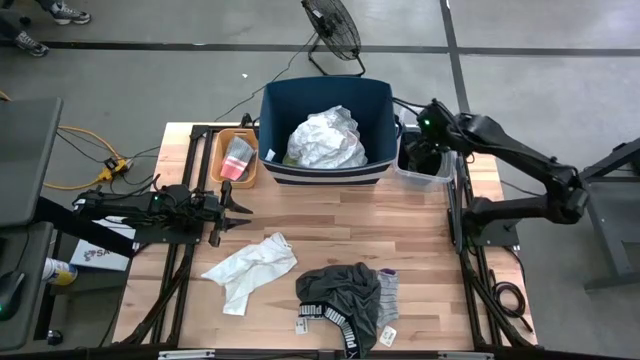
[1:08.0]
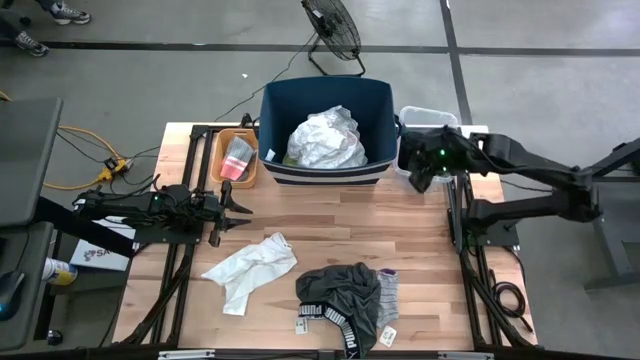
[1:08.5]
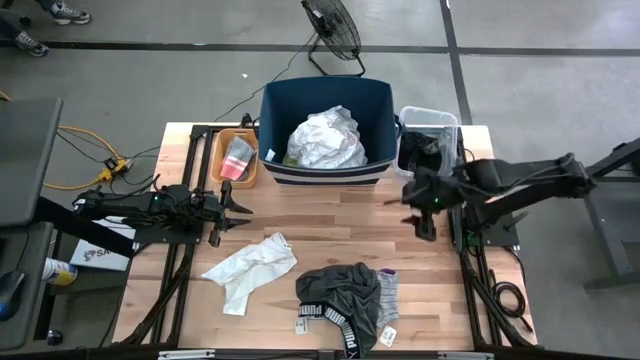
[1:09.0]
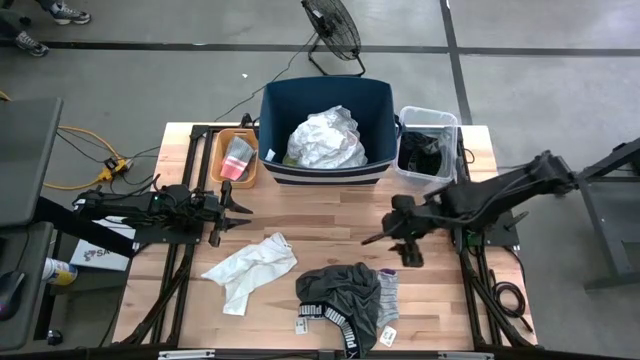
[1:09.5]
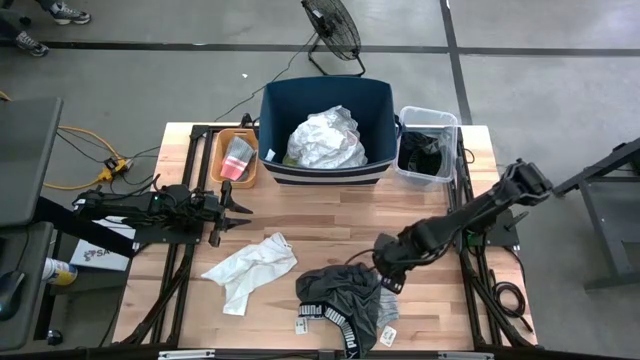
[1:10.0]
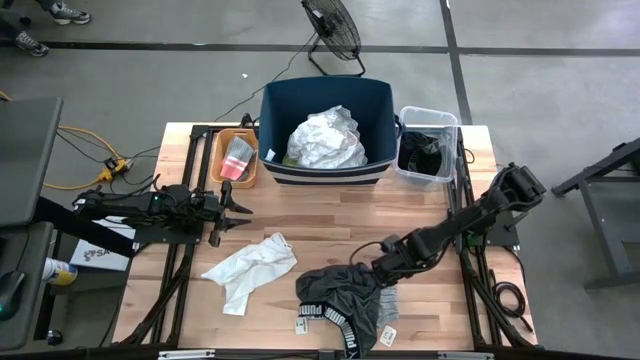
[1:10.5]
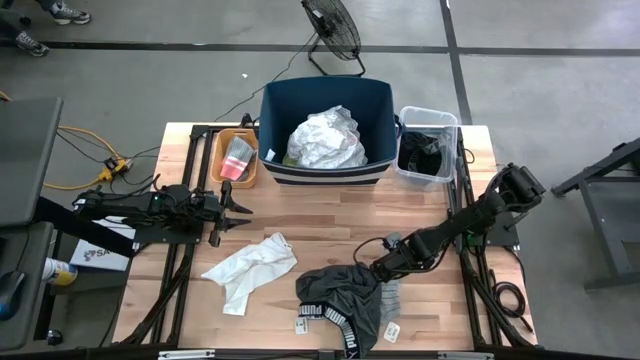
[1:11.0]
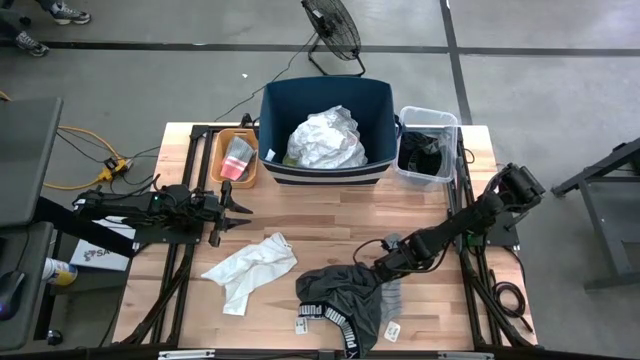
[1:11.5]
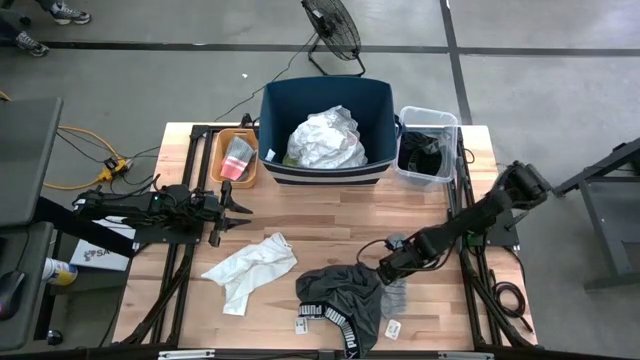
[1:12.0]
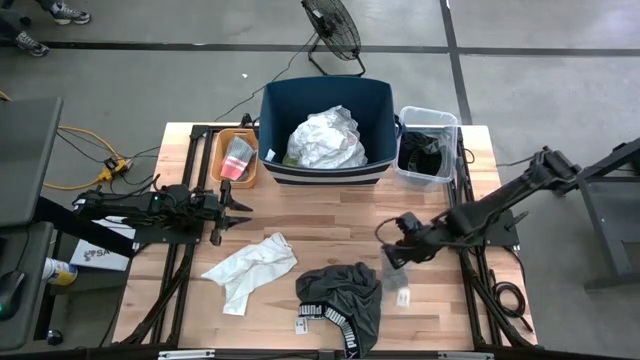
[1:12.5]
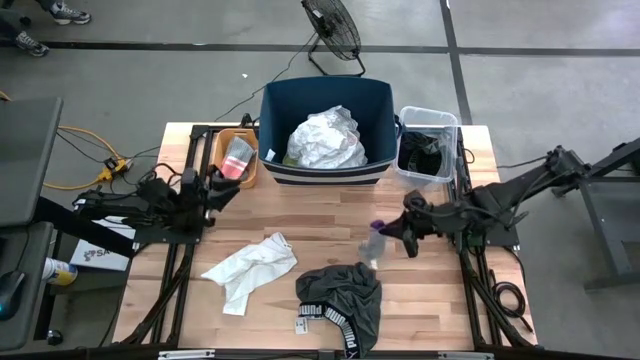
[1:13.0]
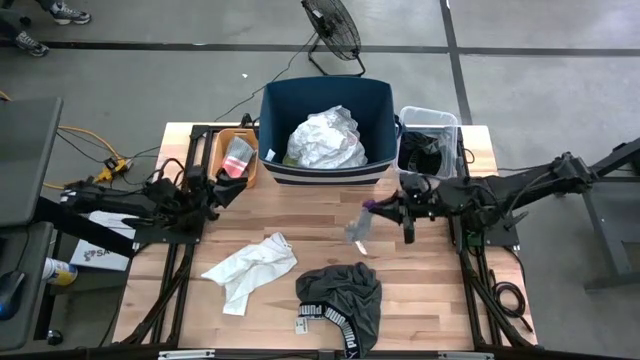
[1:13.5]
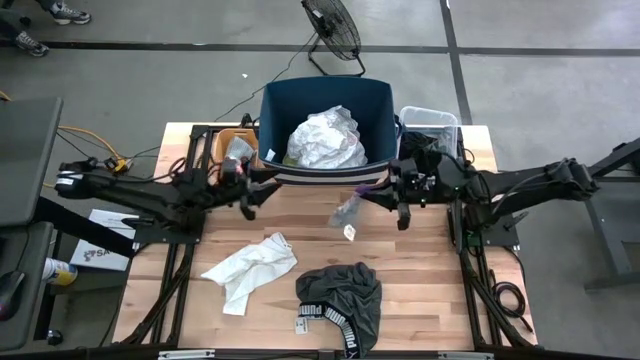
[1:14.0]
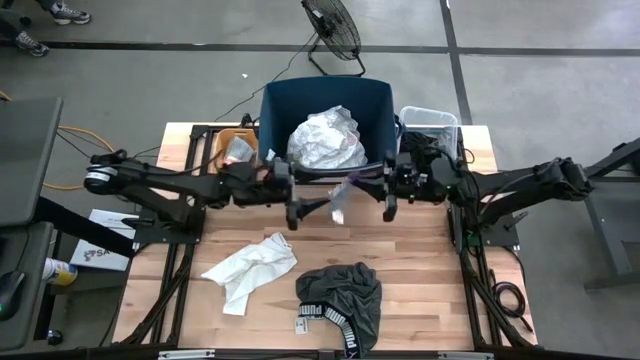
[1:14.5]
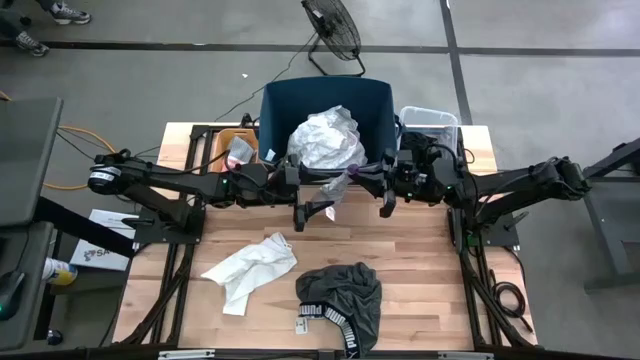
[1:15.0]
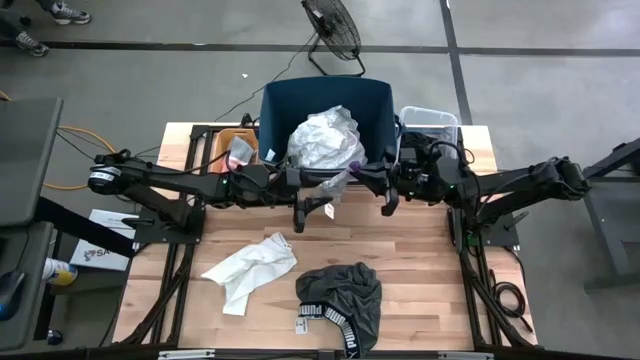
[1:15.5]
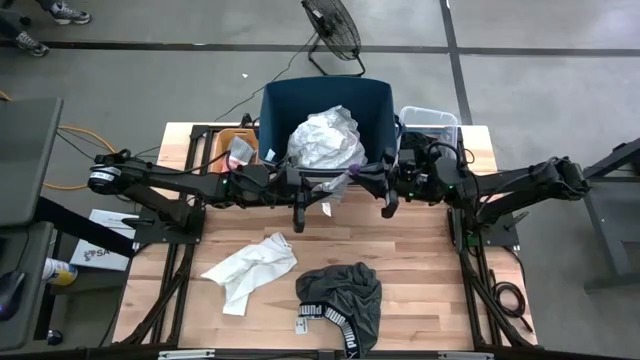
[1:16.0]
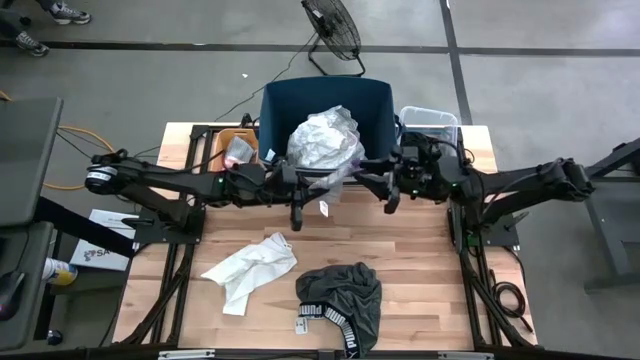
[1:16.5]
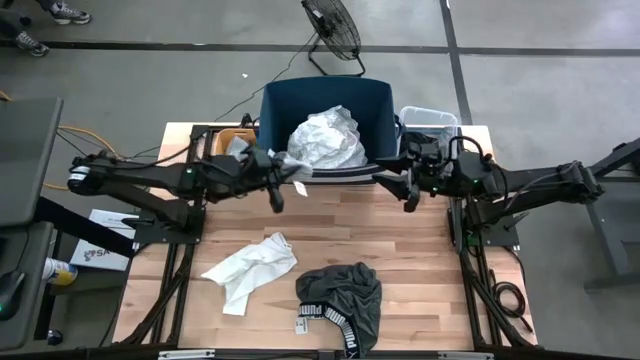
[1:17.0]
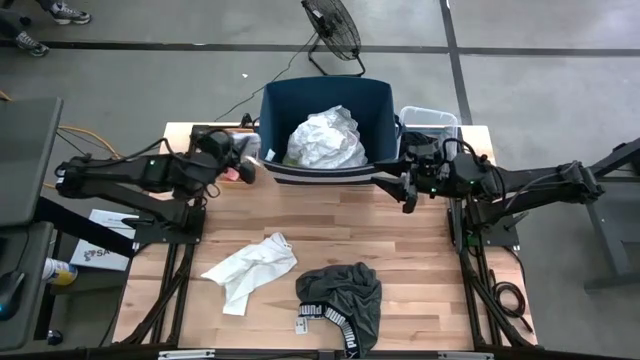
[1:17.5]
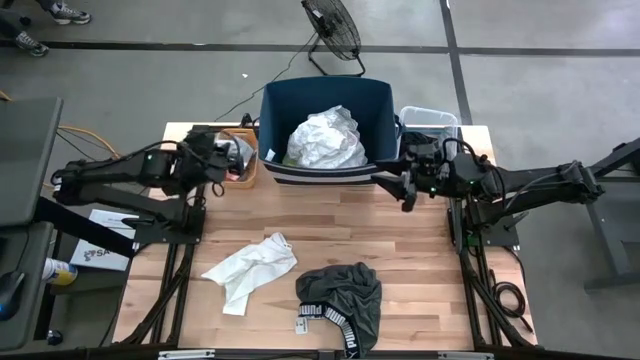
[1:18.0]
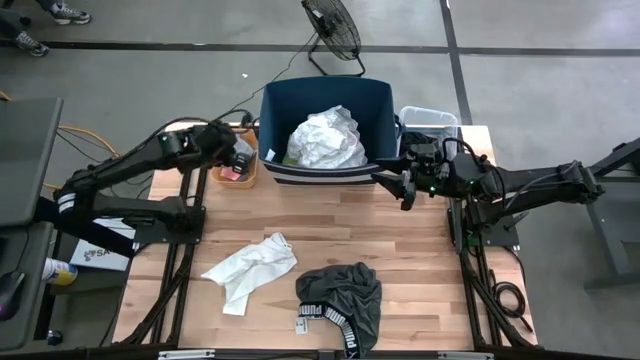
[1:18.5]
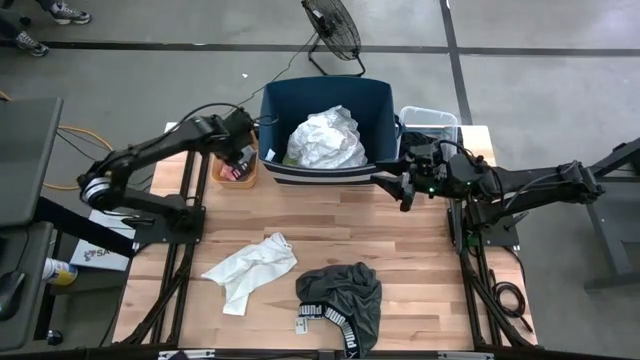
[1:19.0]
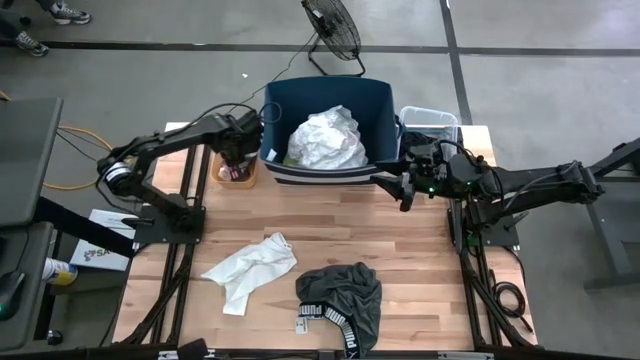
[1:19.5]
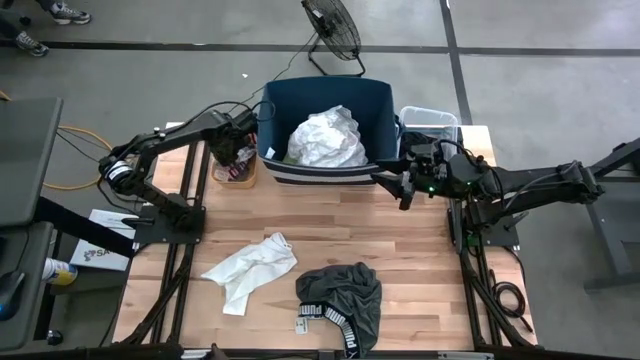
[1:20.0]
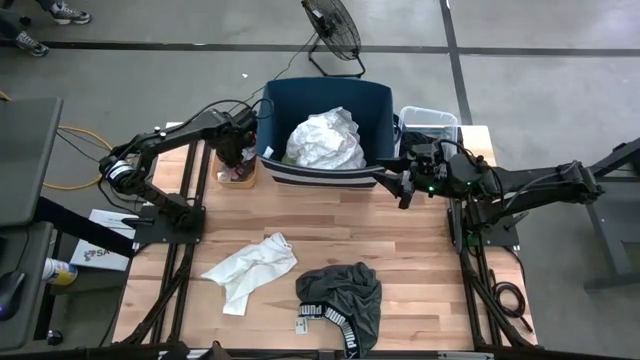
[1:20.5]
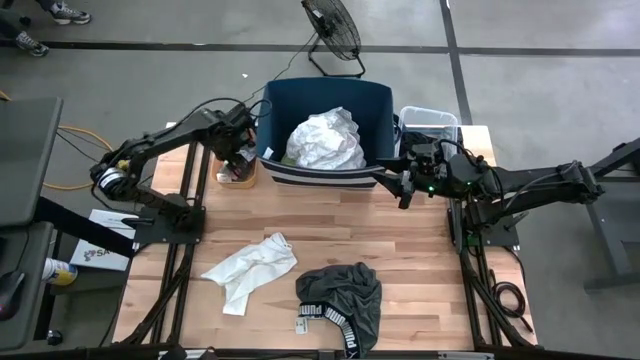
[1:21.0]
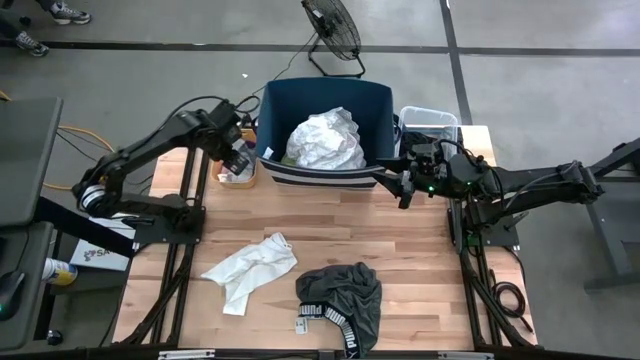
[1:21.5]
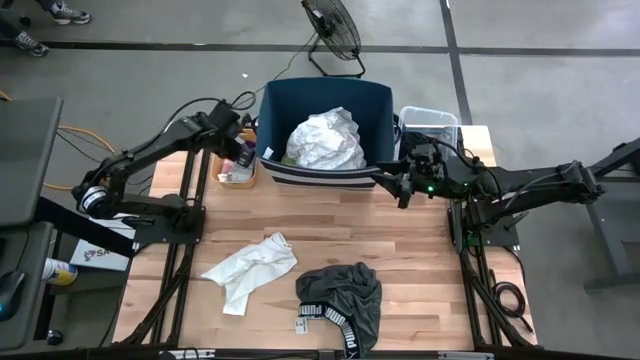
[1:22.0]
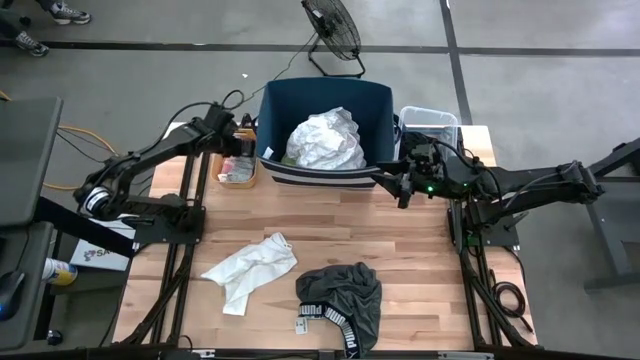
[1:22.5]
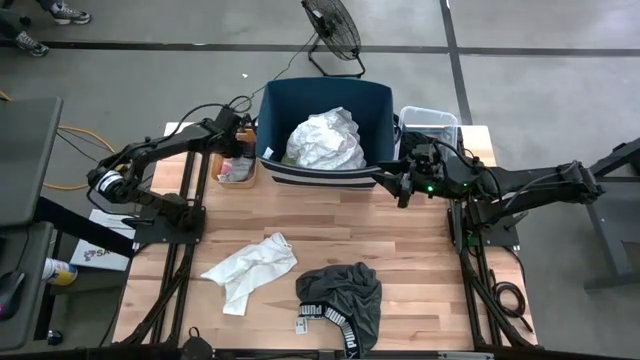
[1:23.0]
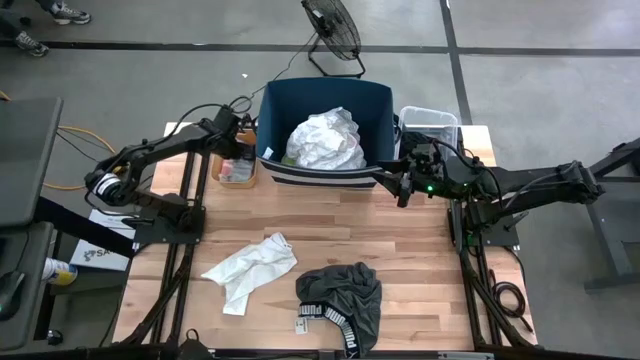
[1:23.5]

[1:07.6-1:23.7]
Task: Pick & Place Cloths
Put the gray violet sock into the yellow bin
